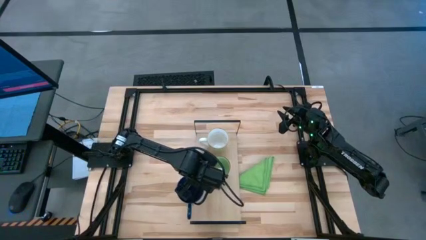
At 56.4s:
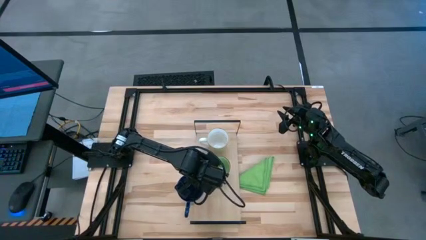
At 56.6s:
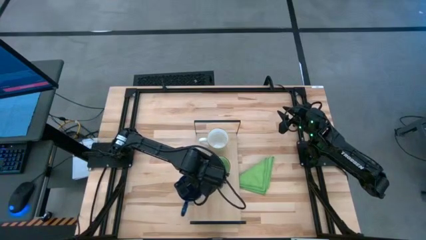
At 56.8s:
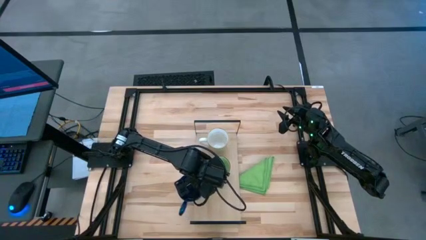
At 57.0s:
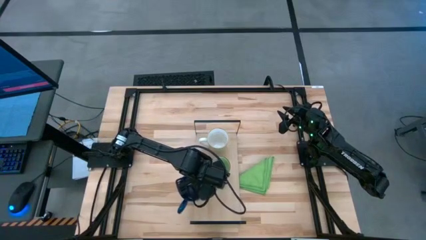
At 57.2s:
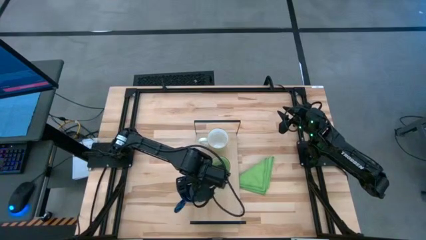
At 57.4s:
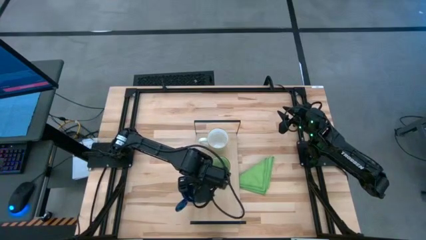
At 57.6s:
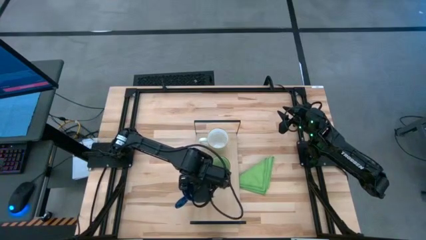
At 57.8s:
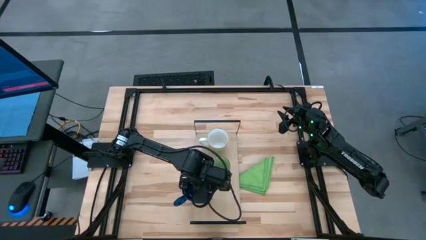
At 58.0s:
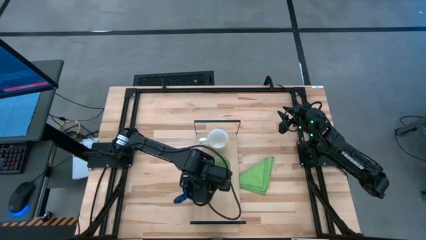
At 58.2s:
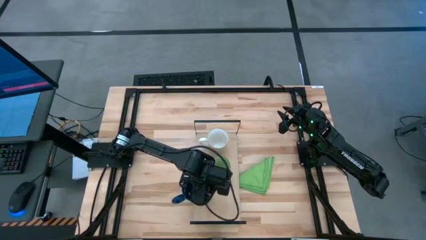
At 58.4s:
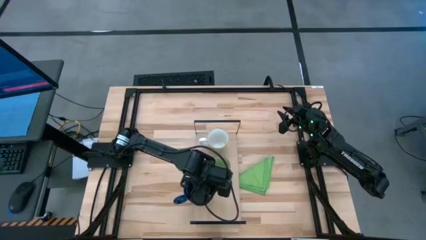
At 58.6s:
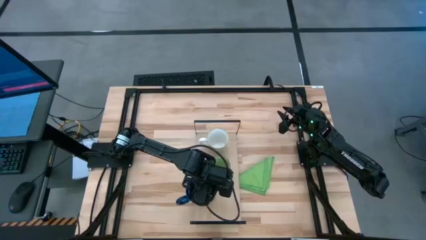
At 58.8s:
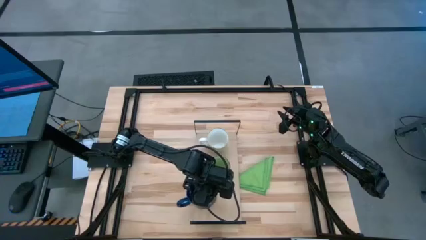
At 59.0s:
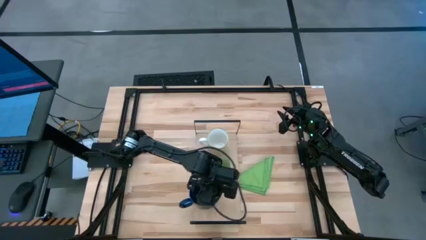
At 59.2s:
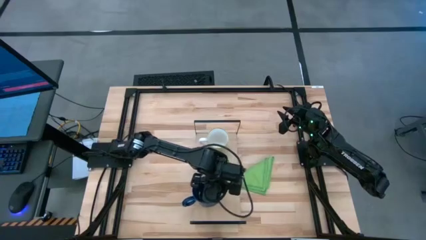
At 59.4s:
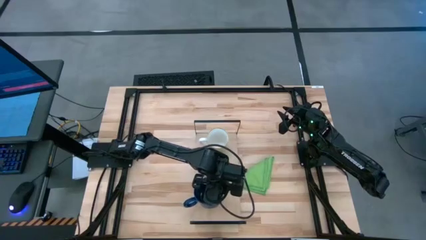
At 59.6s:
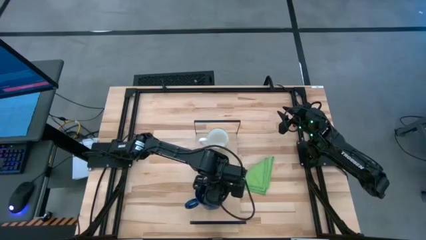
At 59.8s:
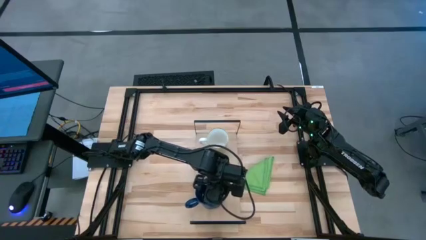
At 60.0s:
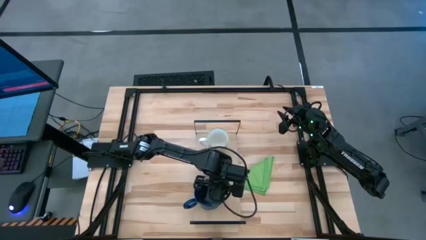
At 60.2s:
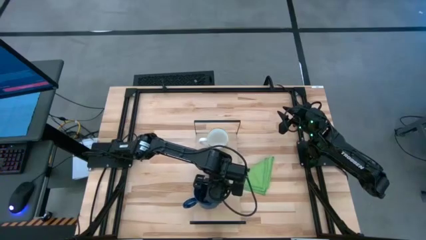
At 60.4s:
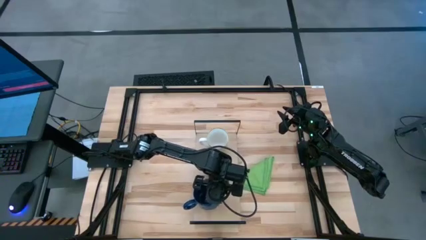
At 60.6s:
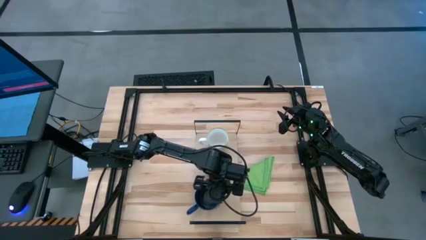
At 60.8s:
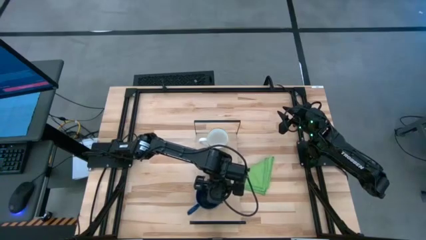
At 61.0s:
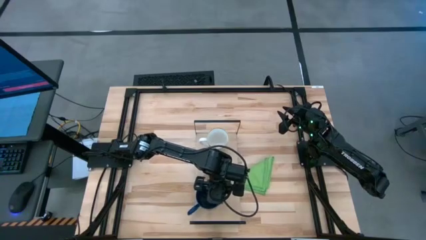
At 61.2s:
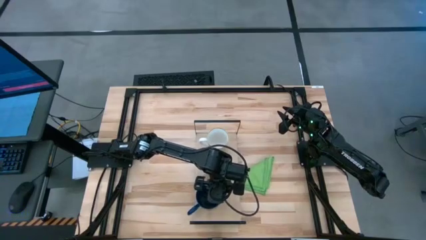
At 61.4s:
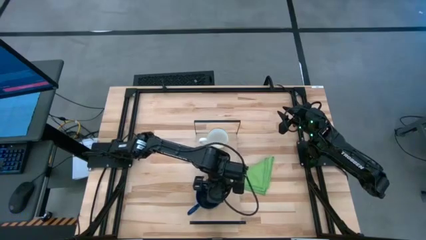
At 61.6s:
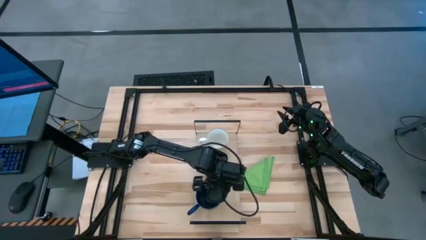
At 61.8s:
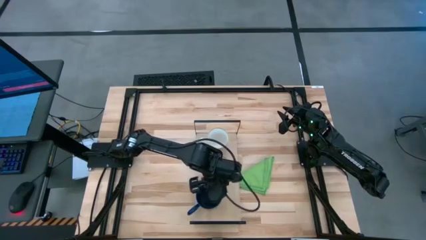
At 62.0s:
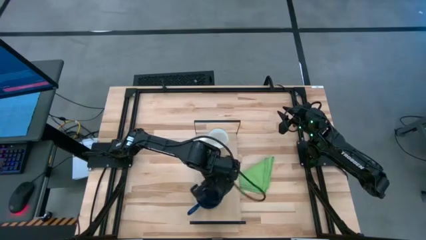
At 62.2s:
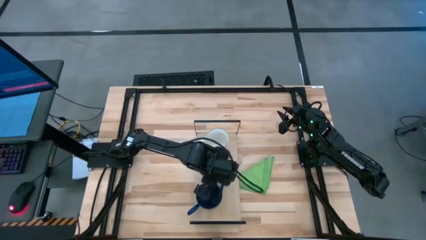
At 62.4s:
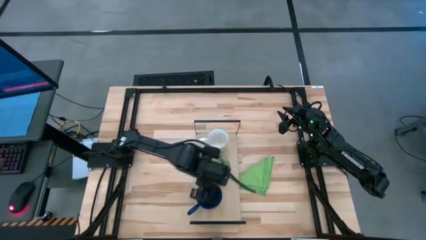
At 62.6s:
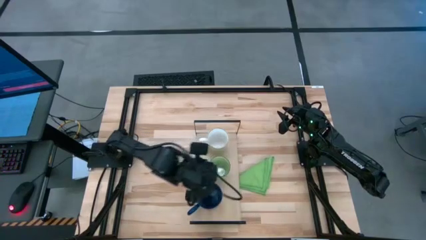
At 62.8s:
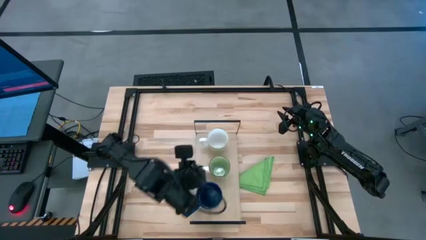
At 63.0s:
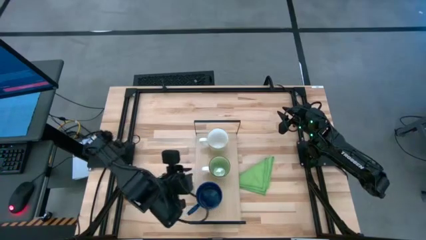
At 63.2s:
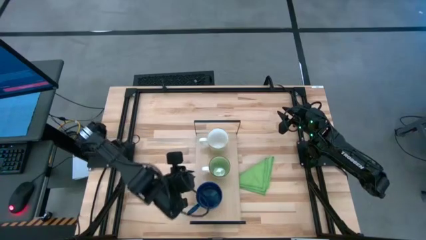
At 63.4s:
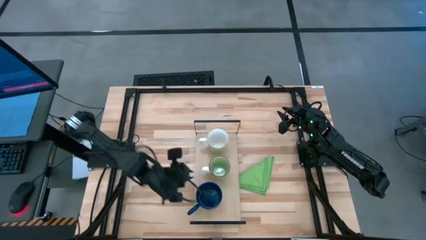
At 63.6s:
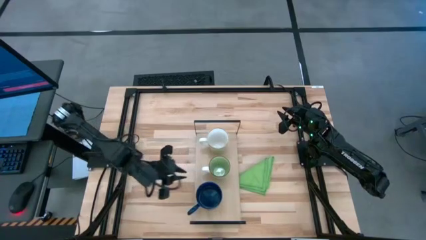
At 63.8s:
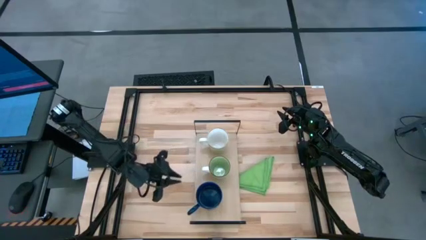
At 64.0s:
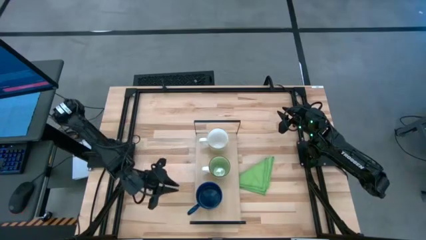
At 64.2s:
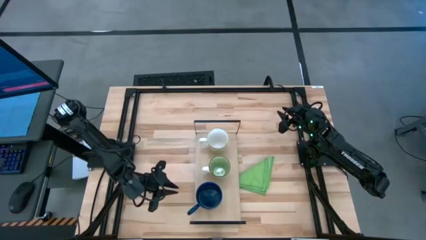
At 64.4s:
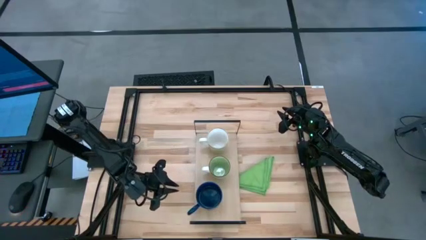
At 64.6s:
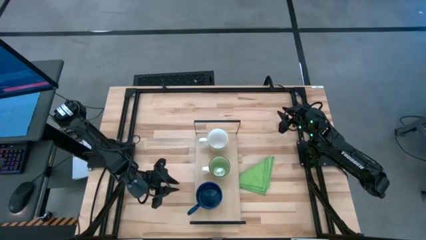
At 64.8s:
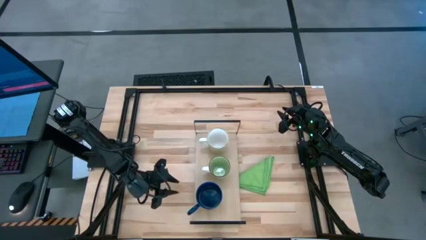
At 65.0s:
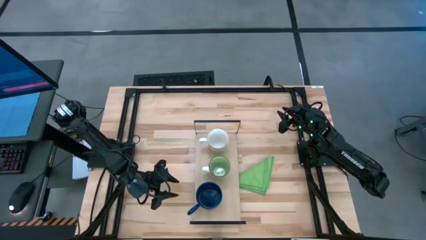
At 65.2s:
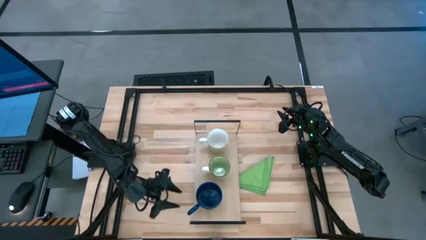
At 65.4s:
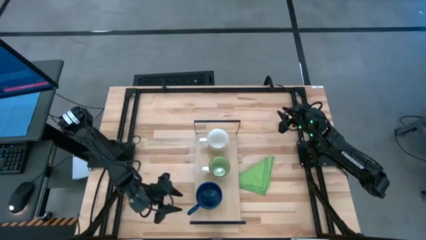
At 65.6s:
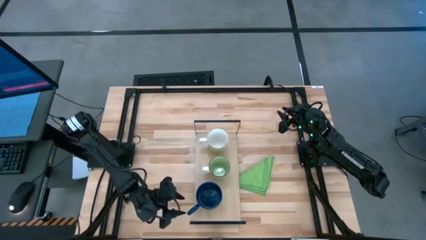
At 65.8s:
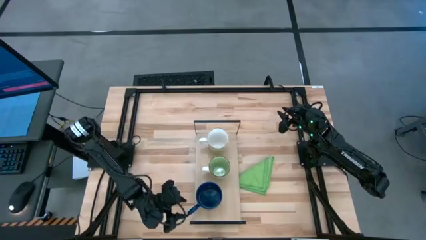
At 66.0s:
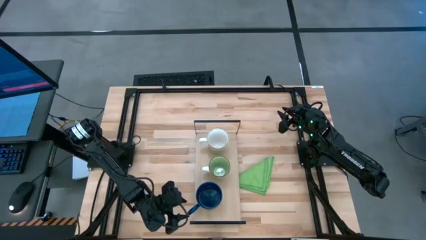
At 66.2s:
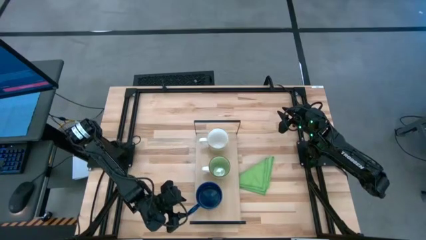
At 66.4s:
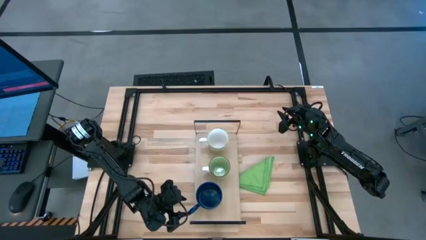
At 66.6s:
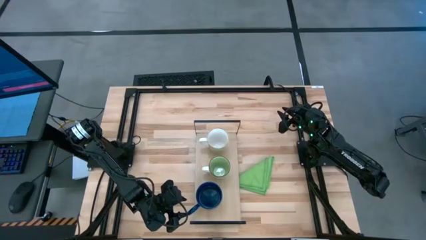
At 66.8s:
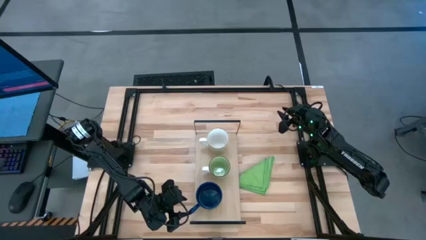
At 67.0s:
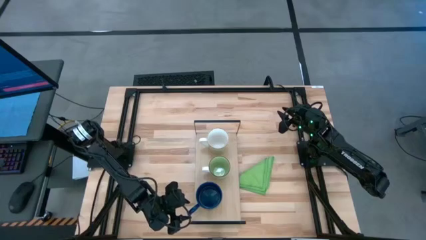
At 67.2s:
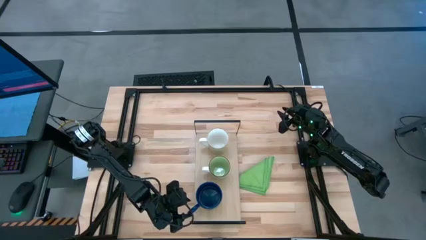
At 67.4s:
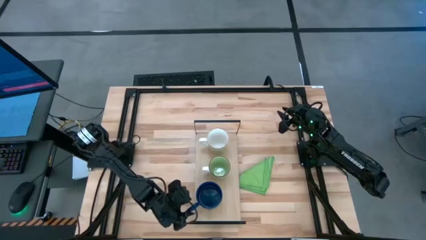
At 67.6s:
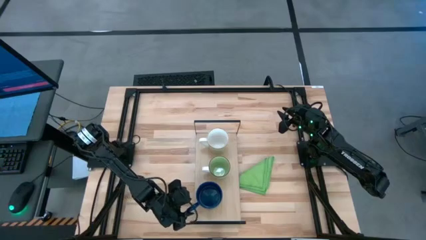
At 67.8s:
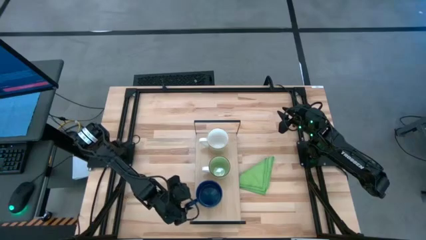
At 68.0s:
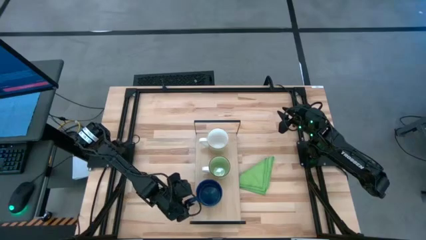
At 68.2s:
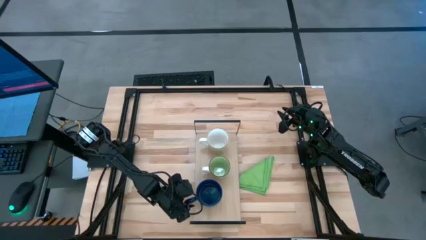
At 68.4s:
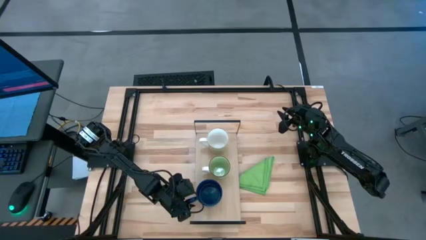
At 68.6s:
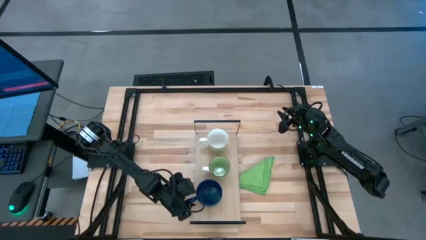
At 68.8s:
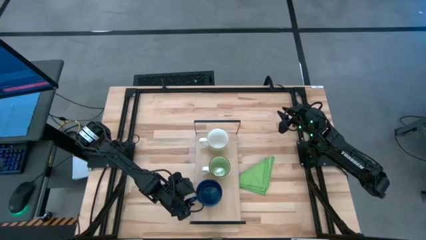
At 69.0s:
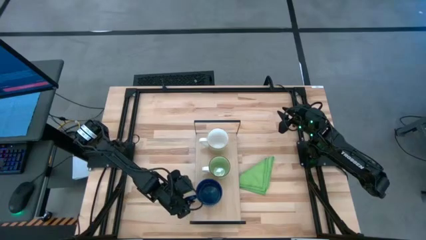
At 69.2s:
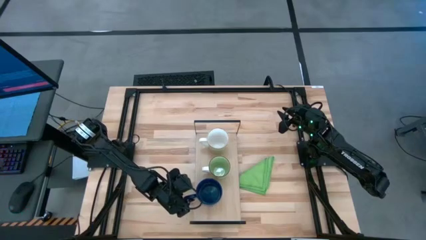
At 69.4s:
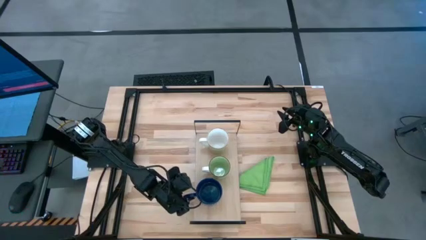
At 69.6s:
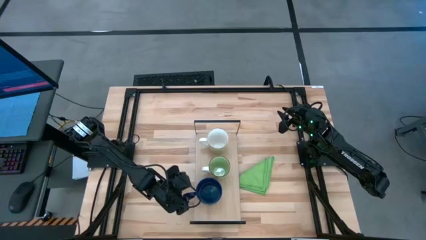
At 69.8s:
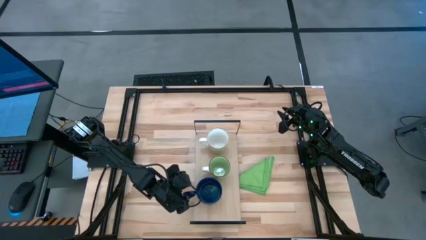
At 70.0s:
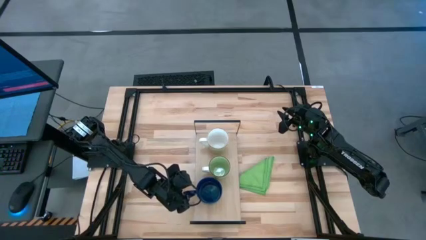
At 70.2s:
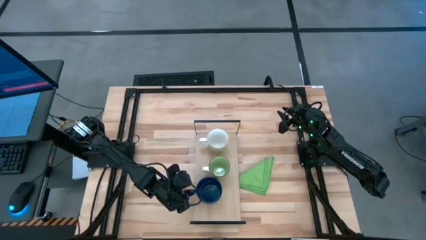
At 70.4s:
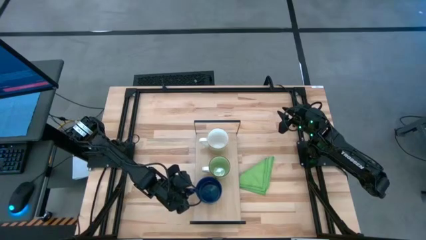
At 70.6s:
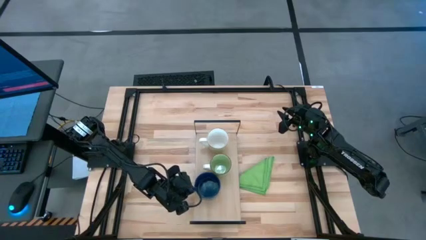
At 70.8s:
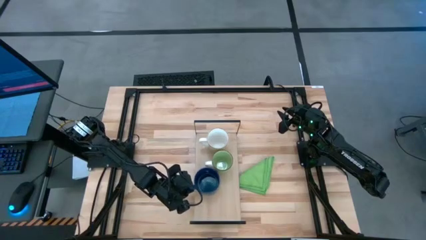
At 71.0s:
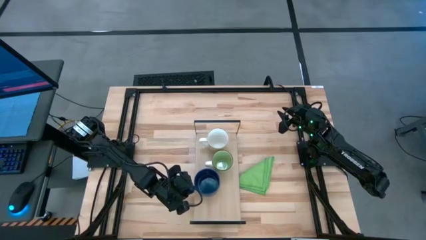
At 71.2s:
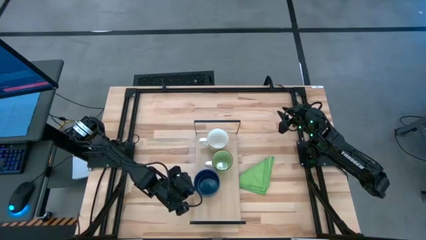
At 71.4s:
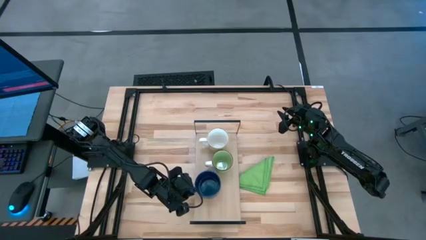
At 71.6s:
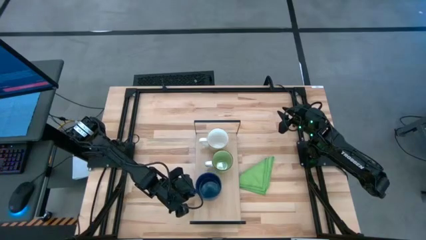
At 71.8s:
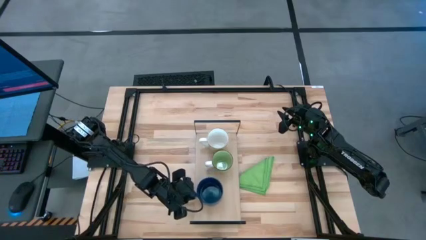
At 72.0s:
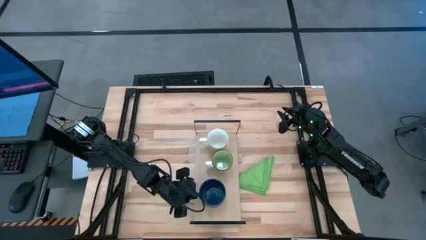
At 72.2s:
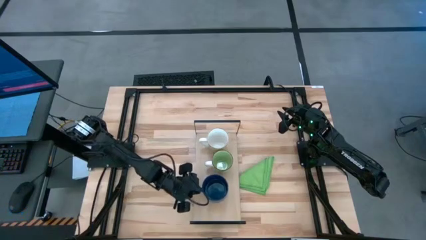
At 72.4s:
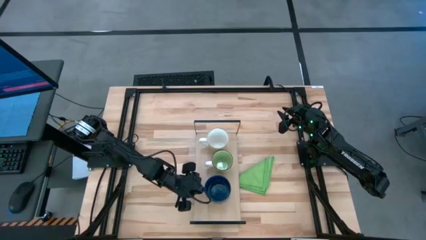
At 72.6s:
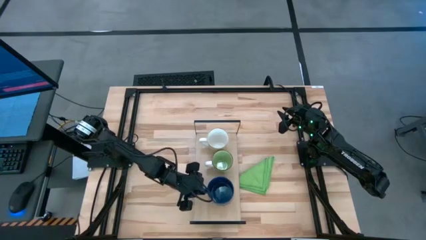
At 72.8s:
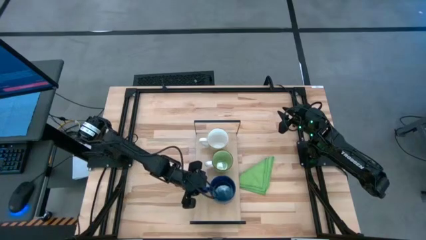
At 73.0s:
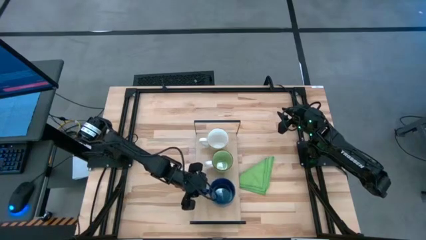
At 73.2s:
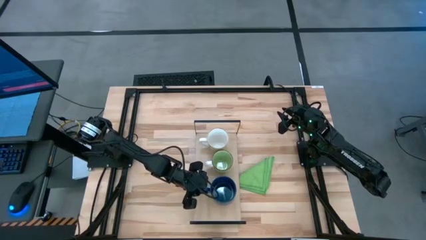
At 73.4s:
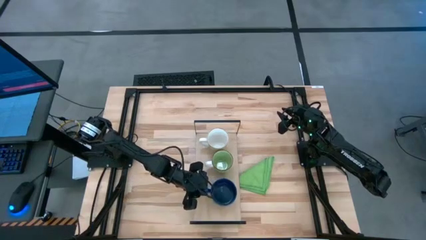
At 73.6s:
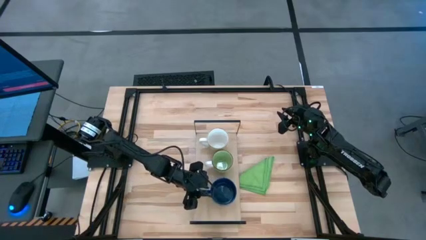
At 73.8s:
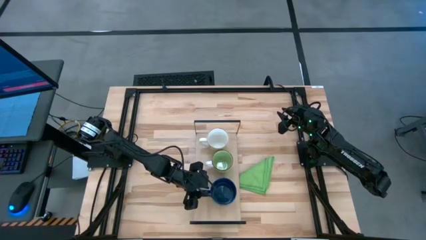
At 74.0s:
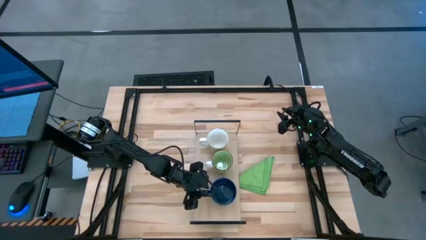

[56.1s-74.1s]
Task: Stack small to large cups/mugs on shelf
Put the blue mug on the shelf
